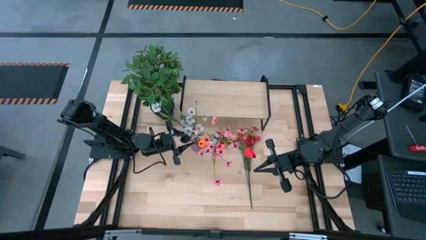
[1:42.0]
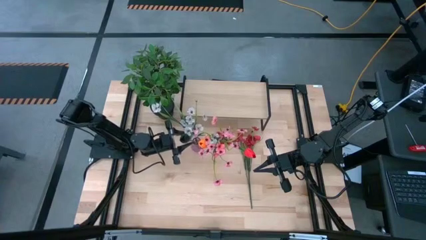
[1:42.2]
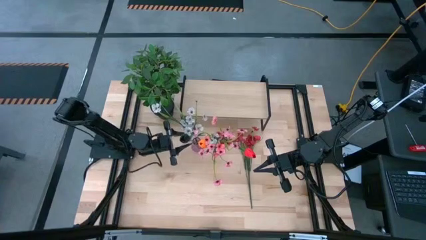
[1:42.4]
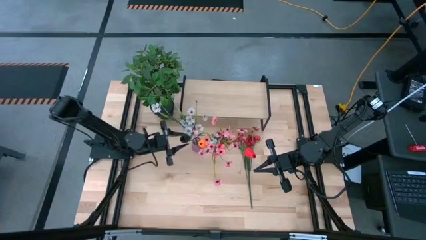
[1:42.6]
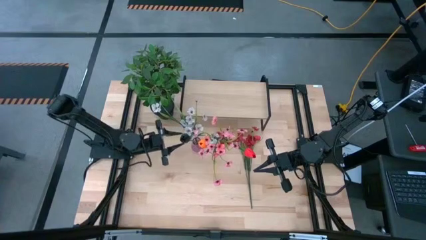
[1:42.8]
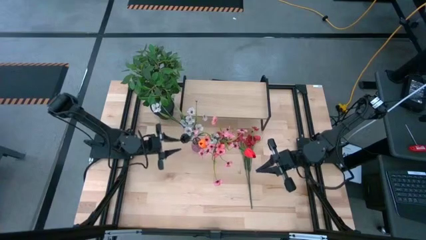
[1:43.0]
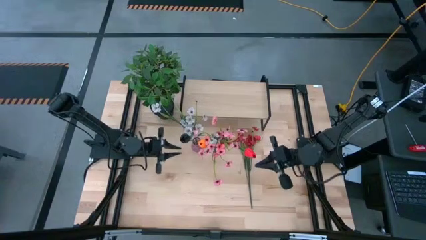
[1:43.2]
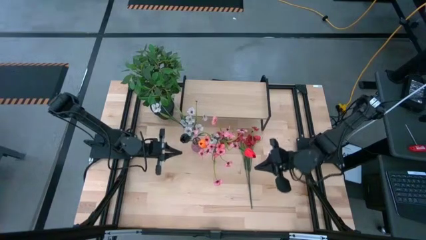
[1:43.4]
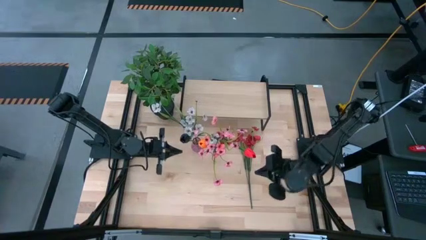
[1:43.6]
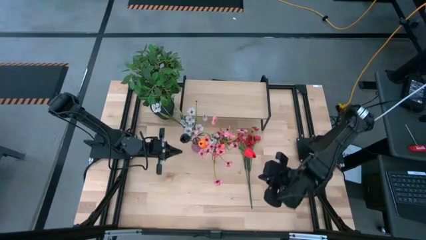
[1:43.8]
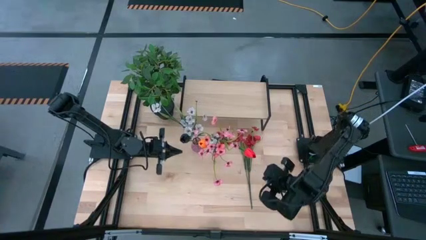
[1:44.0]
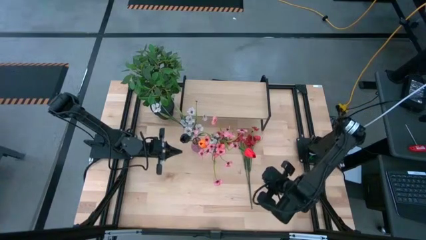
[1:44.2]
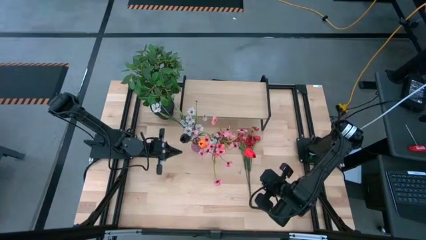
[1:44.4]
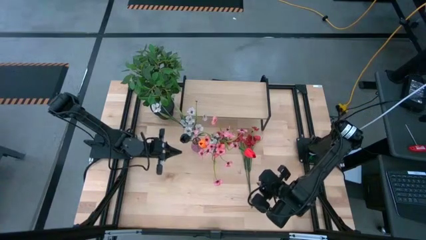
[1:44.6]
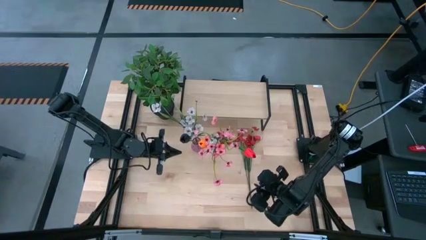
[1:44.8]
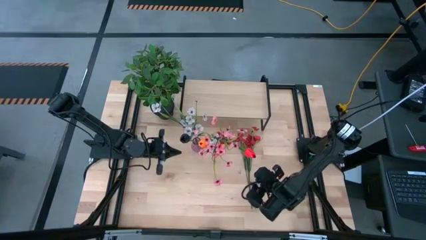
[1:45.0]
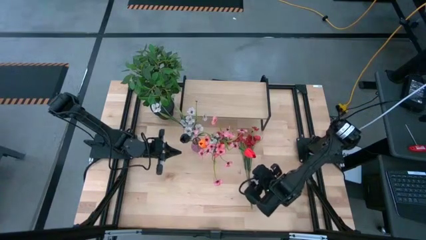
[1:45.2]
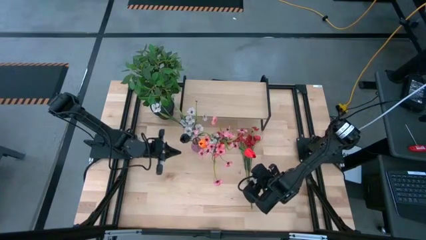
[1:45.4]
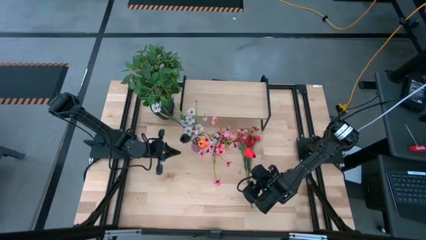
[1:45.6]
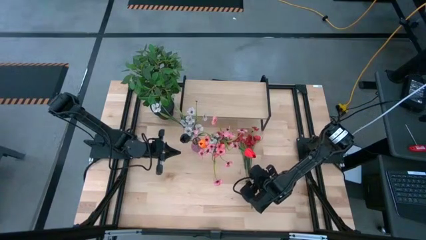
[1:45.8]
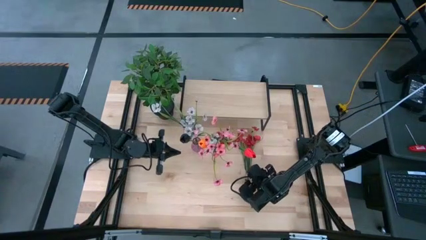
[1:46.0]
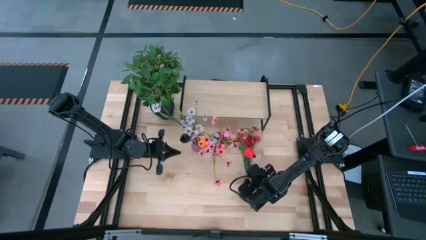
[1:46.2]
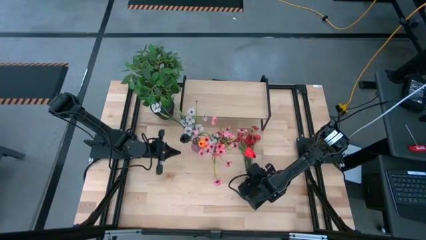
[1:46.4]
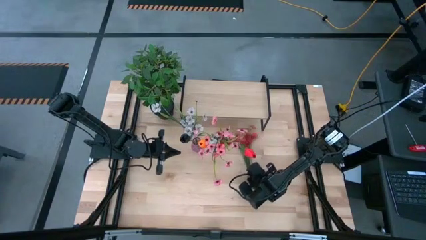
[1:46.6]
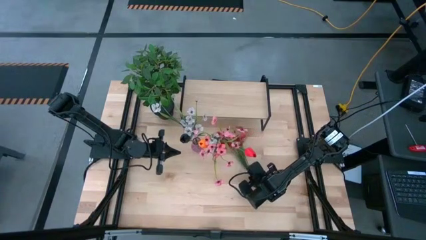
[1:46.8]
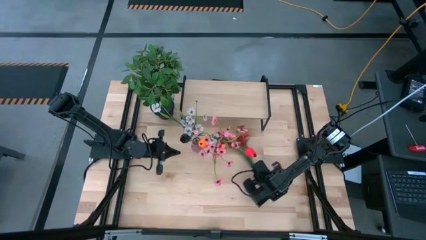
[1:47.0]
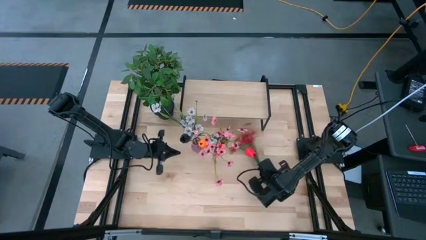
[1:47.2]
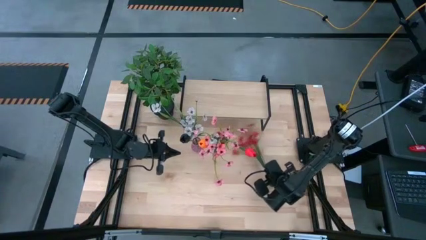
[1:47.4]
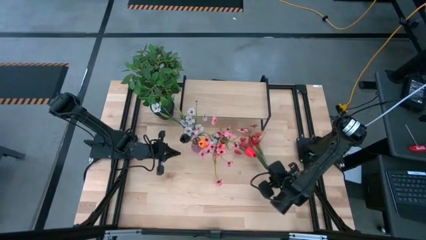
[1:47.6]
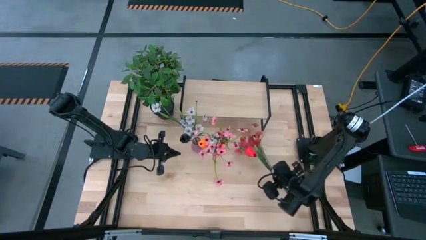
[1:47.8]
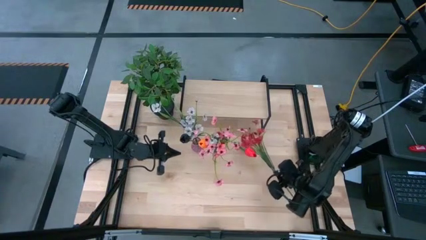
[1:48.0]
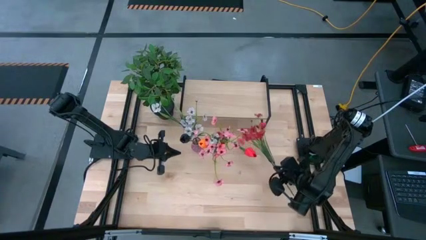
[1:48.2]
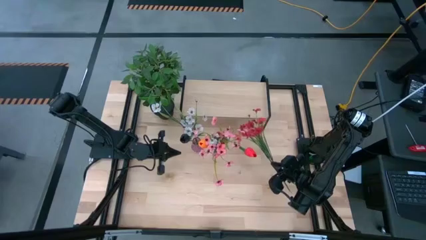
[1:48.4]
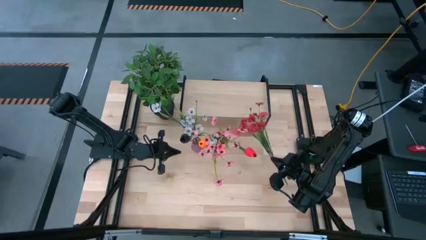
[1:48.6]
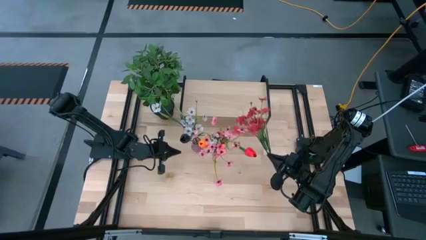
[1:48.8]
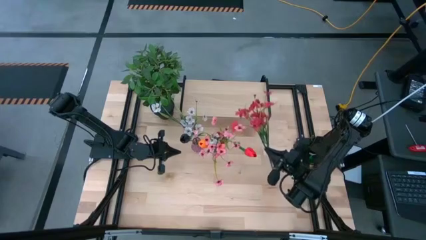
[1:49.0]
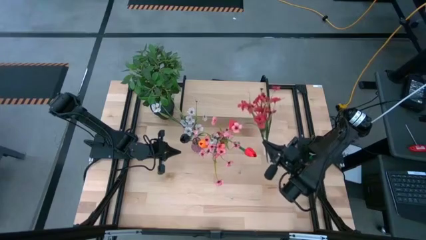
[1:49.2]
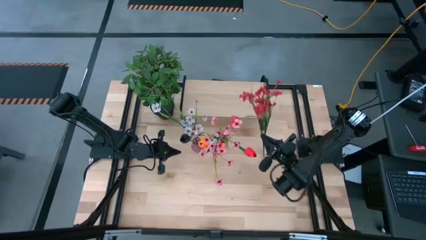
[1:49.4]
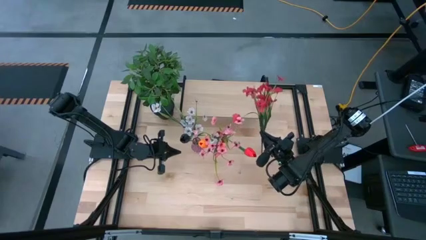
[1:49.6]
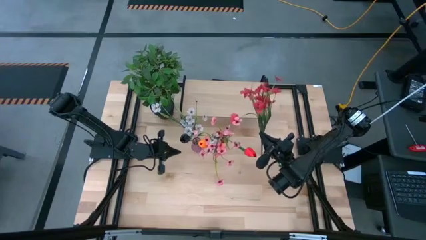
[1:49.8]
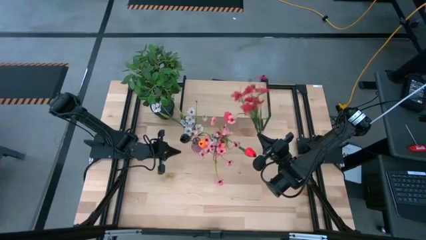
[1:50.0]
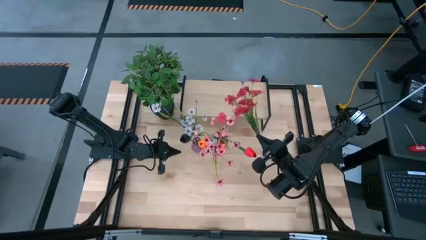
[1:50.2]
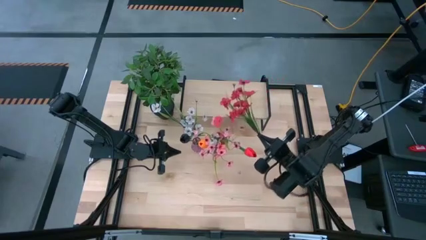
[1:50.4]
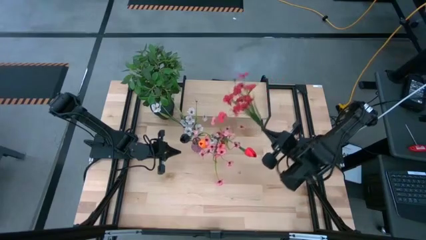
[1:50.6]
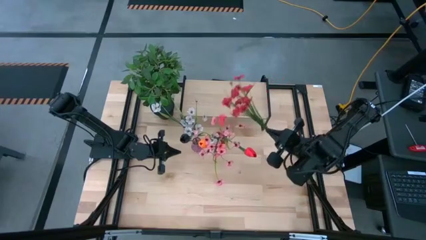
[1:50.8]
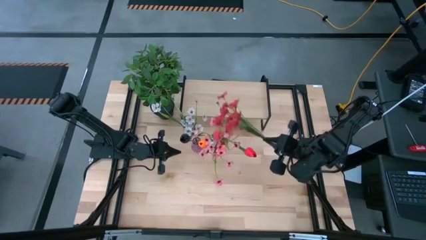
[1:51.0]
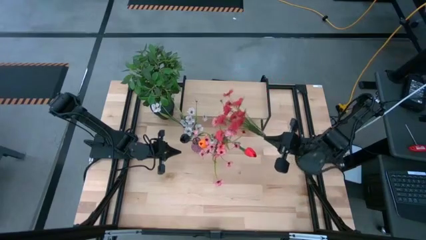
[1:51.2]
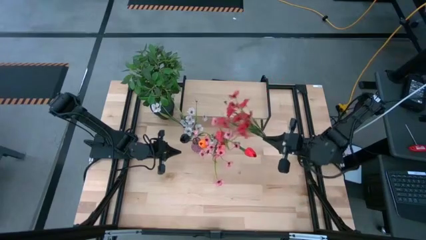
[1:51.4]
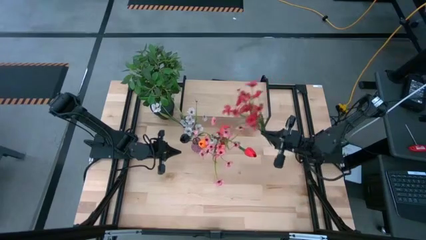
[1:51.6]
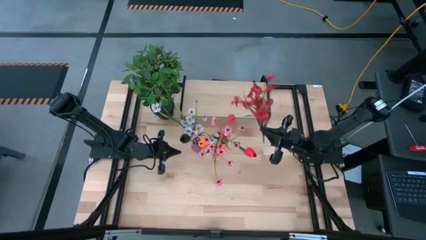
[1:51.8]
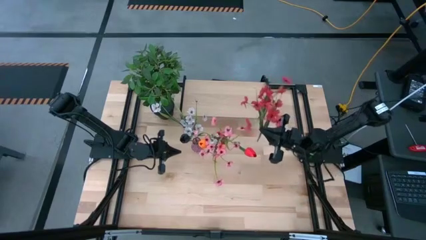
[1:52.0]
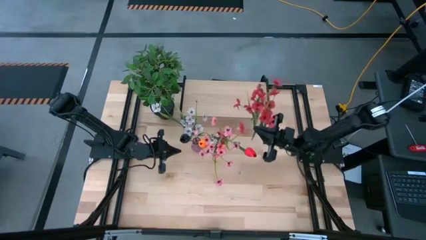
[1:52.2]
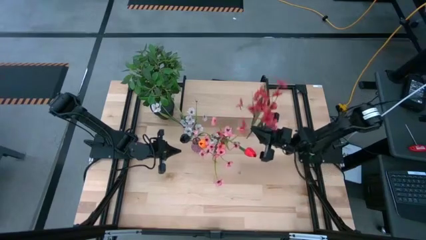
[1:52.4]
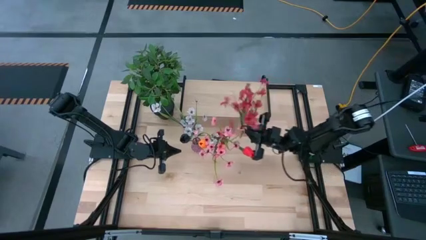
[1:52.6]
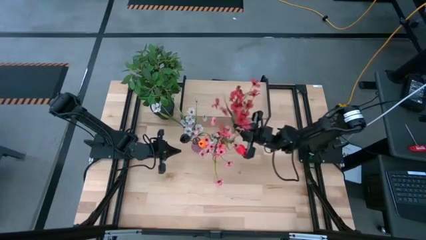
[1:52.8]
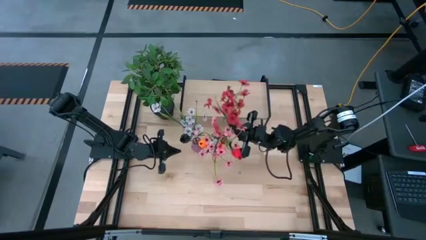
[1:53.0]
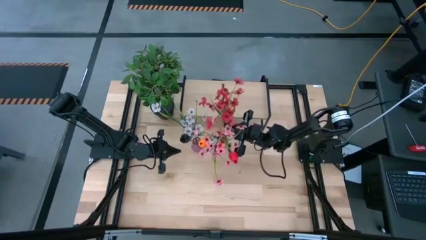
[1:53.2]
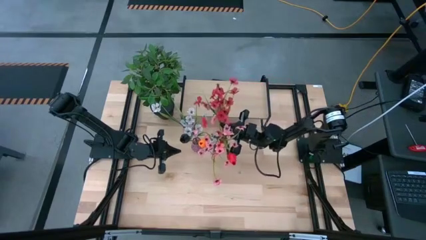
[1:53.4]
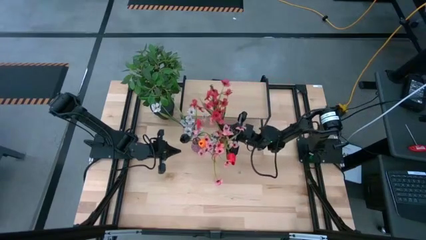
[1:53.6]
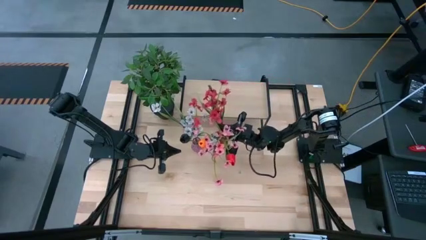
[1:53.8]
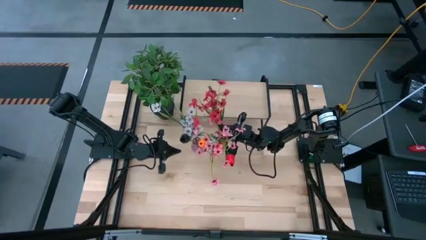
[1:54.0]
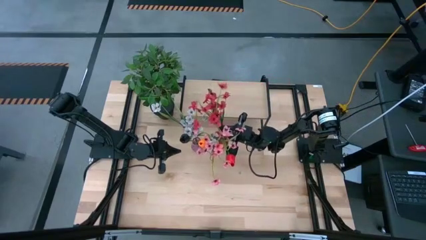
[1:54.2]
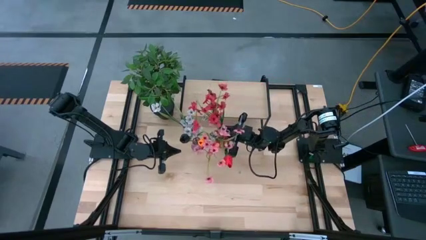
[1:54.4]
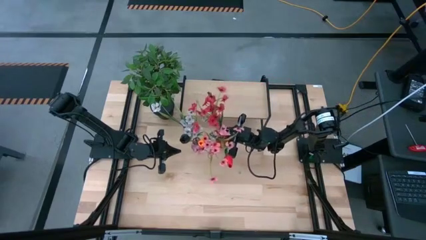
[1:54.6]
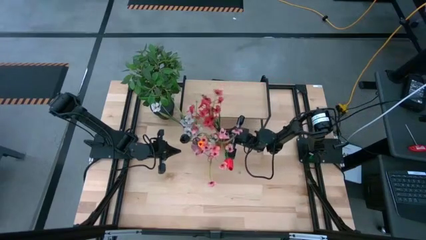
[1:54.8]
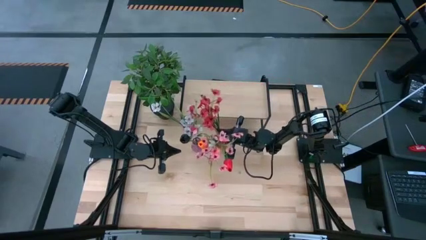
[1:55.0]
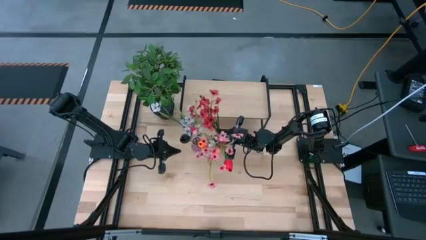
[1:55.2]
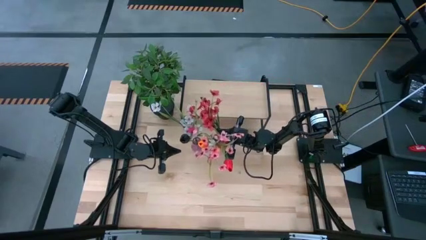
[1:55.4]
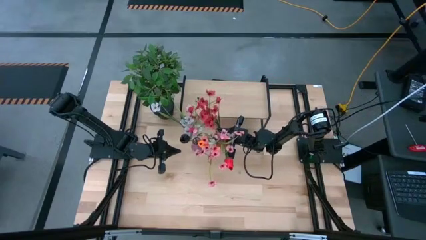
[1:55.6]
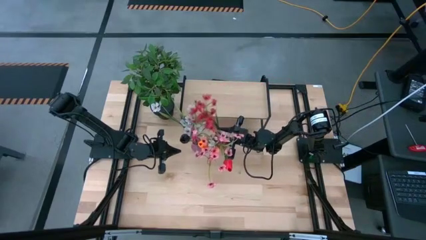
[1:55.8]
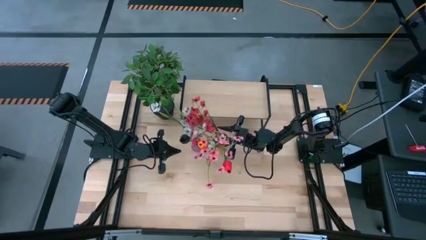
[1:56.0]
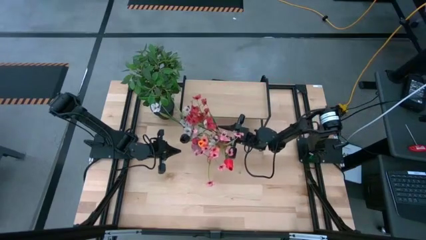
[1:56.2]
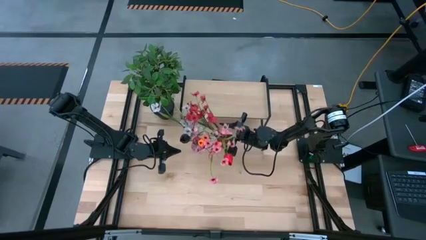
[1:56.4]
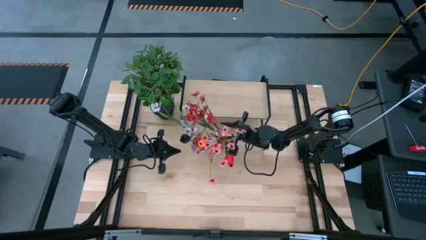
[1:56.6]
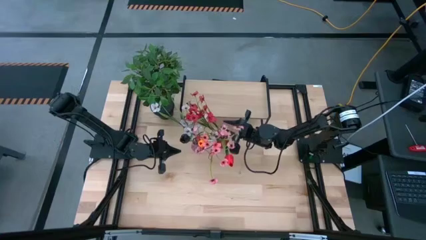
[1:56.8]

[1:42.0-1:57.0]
Task: Pick and place flowers into a vace then onto a shelf
Put the red flowers into the red vase

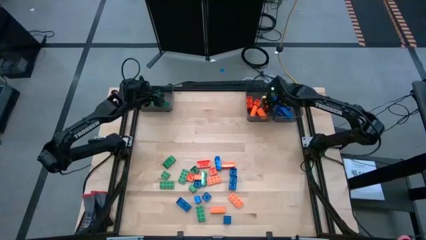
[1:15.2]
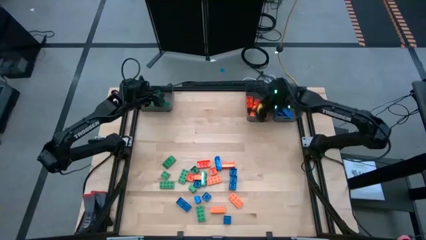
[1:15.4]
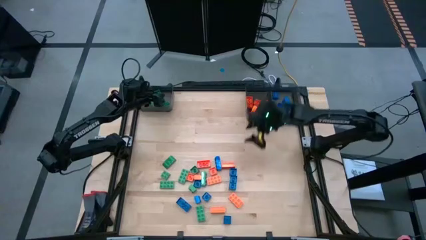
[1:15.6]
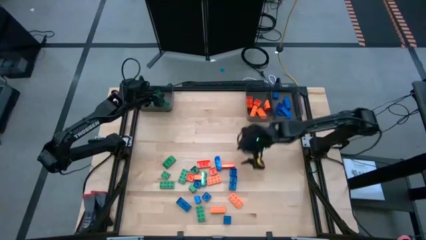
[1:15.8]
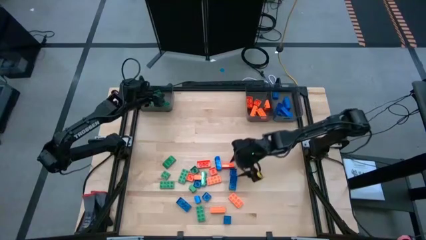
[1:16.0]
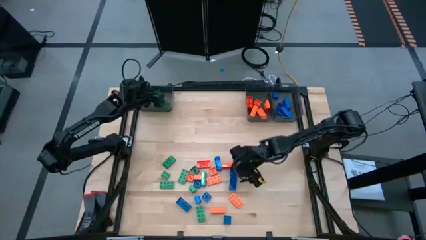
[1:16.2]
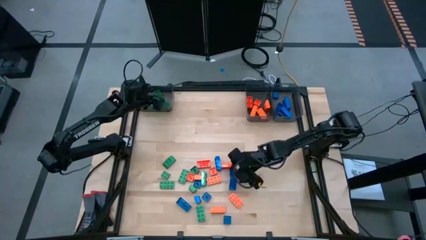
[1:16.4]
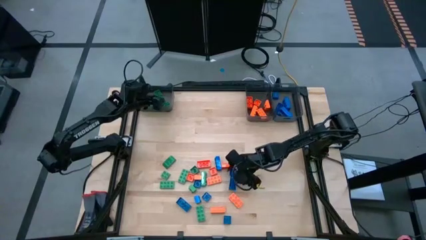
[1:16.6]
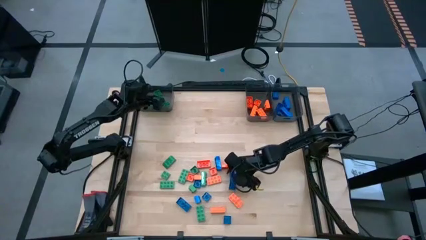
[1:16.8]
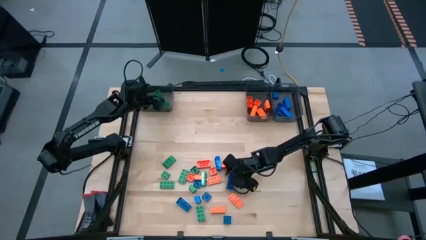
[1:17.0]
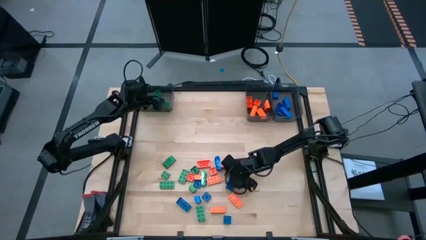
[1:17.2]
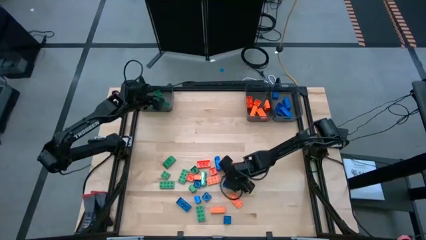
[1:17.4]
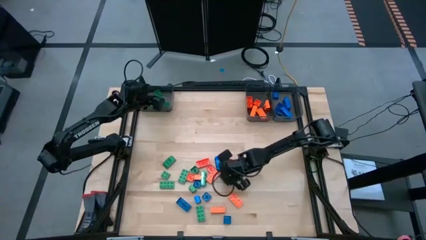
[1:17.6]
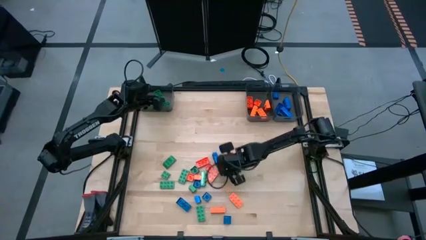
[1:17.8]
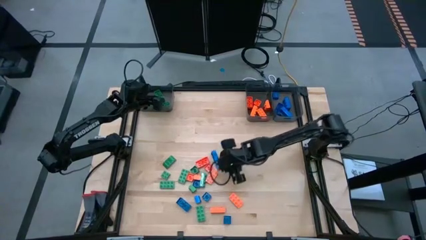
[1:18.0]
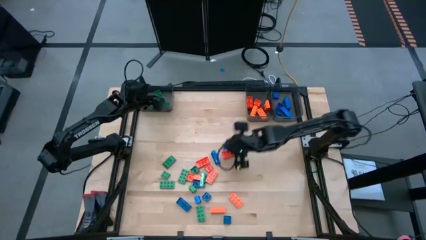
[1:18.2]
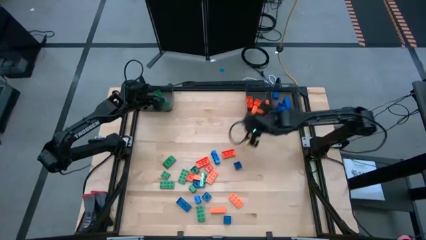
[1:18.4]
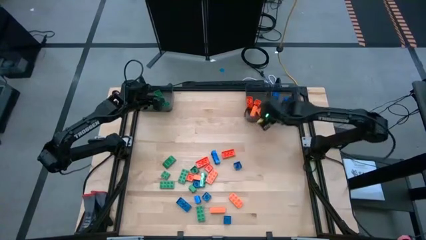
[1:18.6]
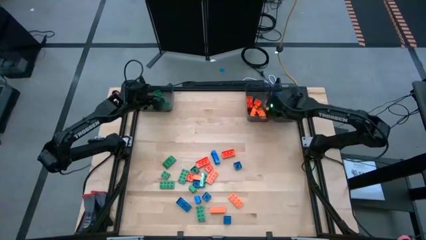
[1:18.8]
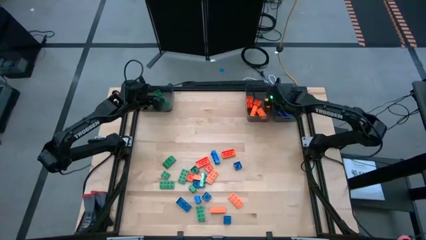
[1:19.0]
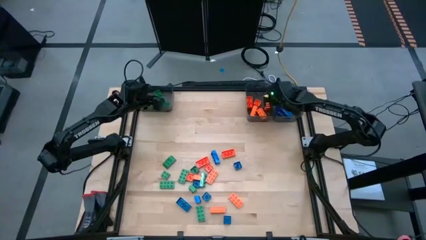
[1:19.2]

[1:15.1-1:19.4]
Task: Sort blocks
Put the blue game piece into the right black bin
